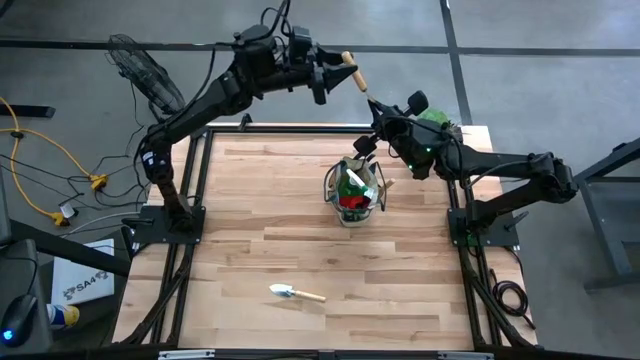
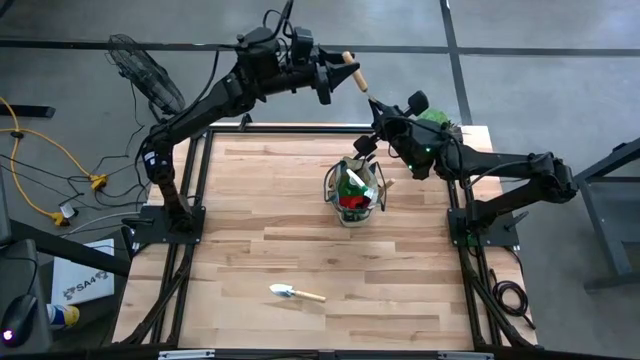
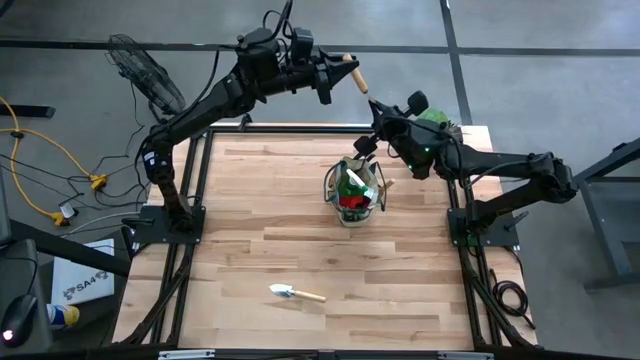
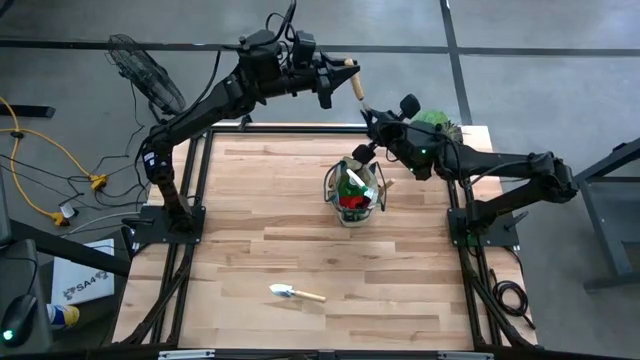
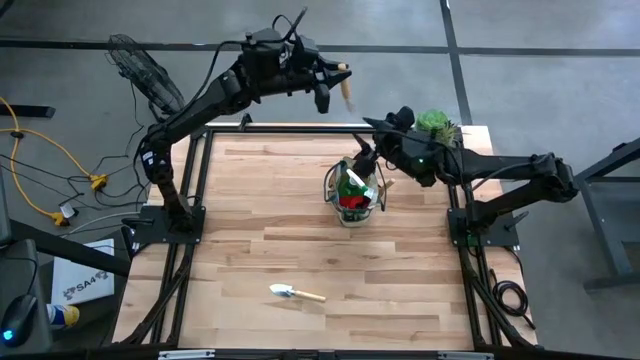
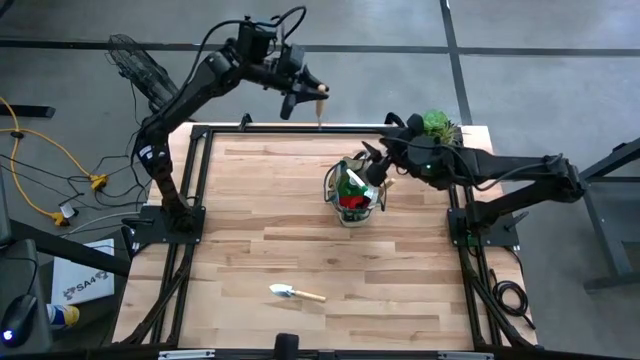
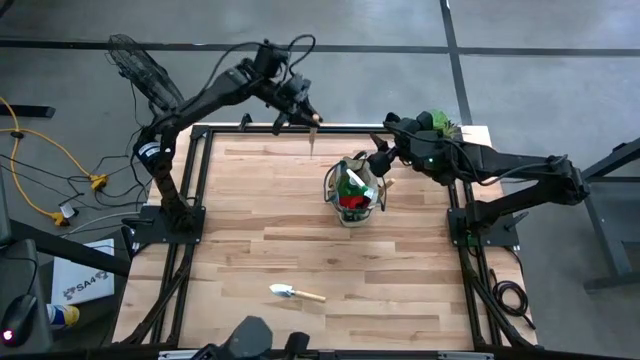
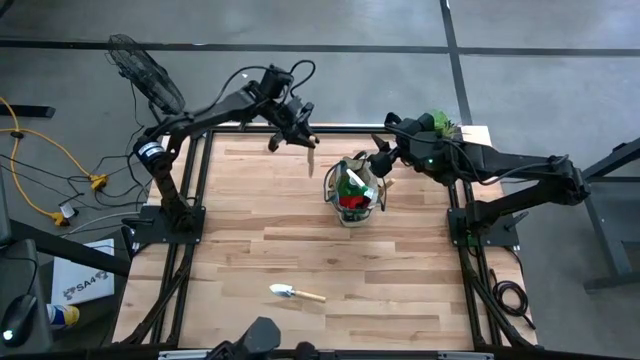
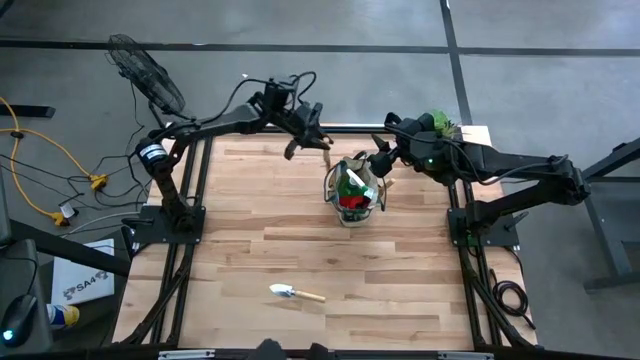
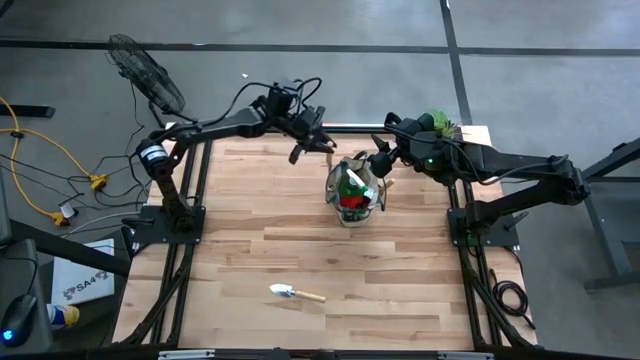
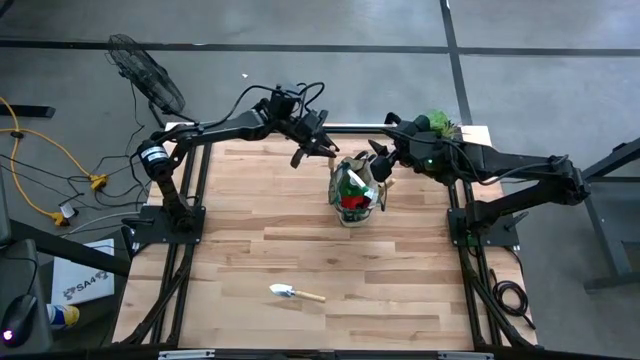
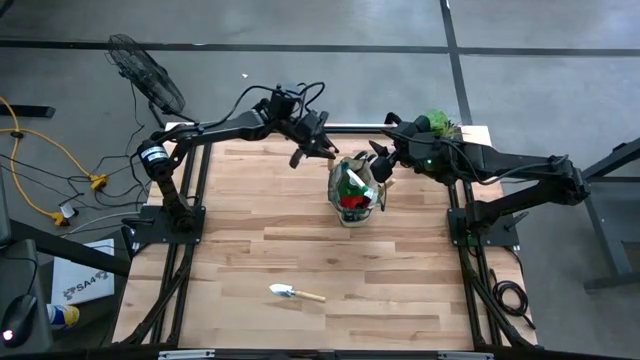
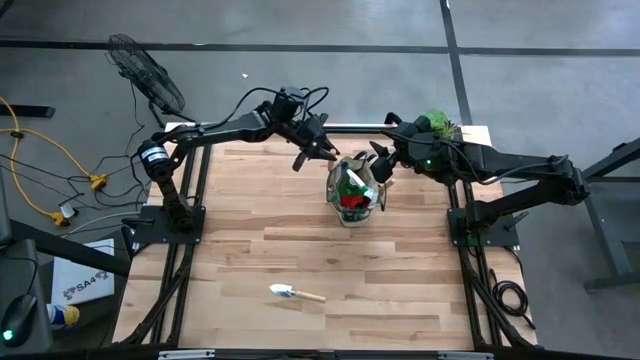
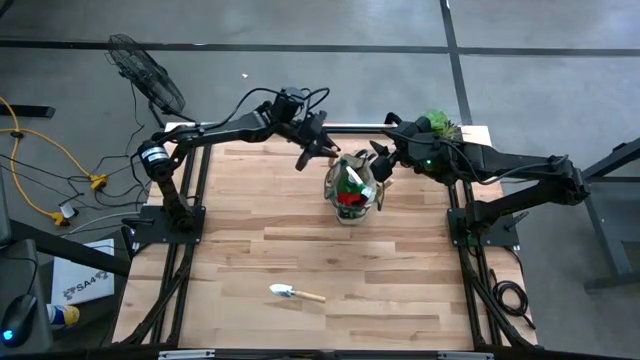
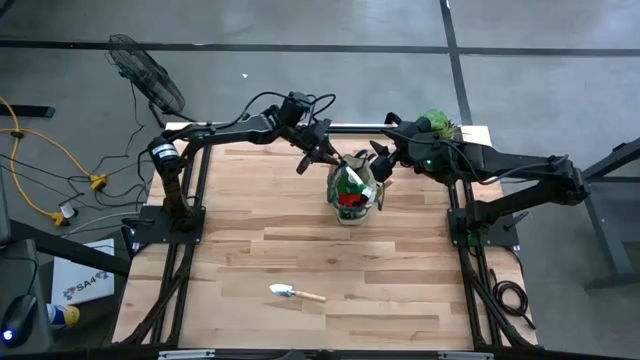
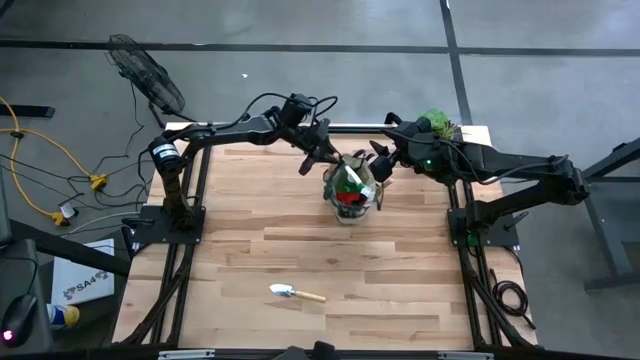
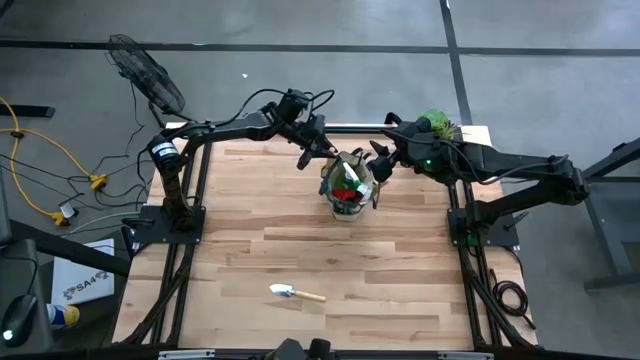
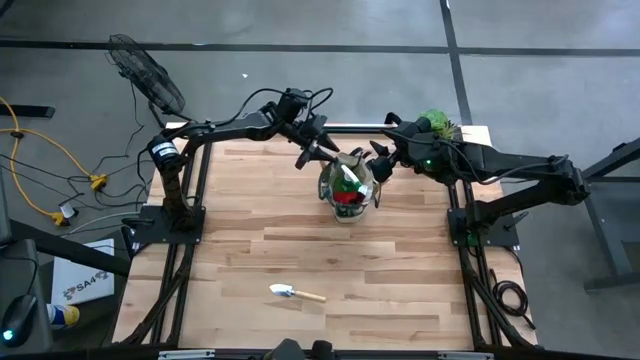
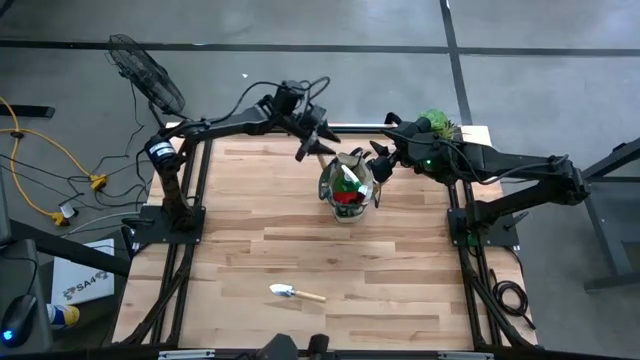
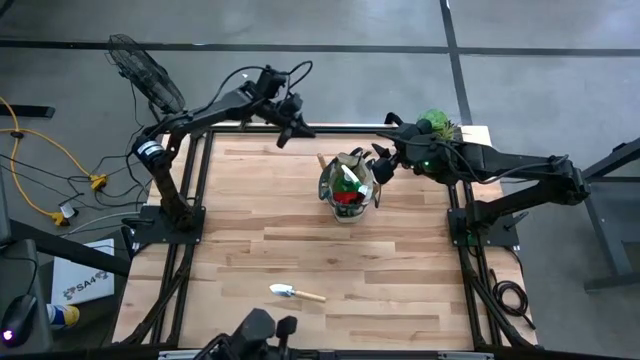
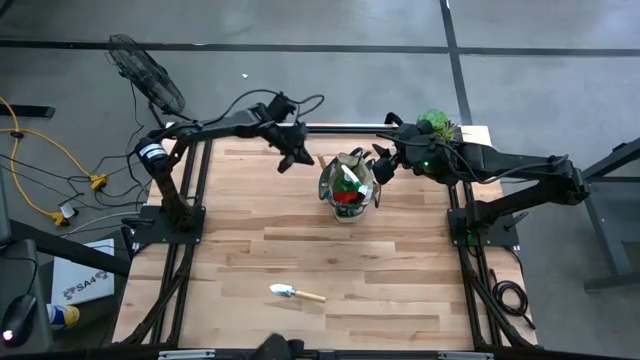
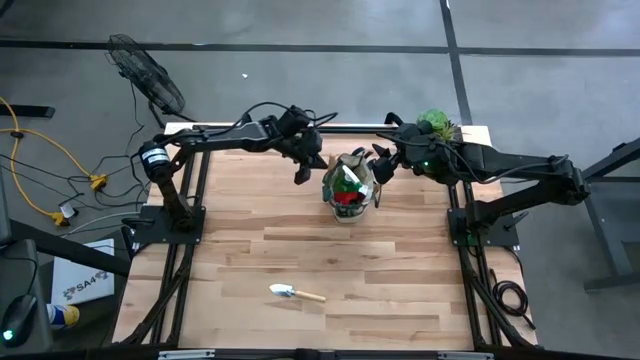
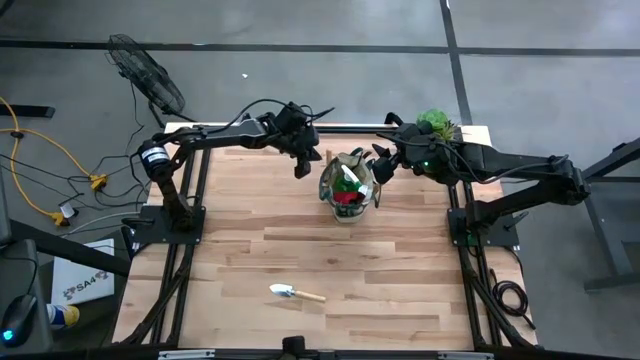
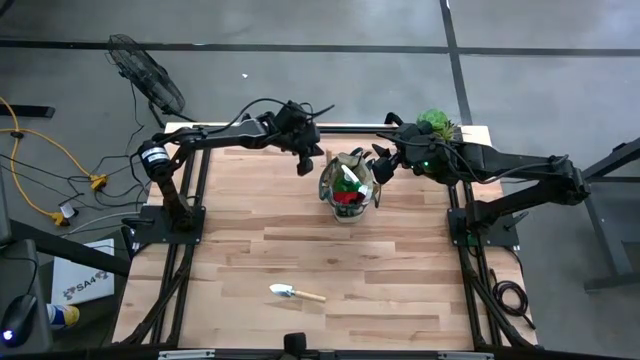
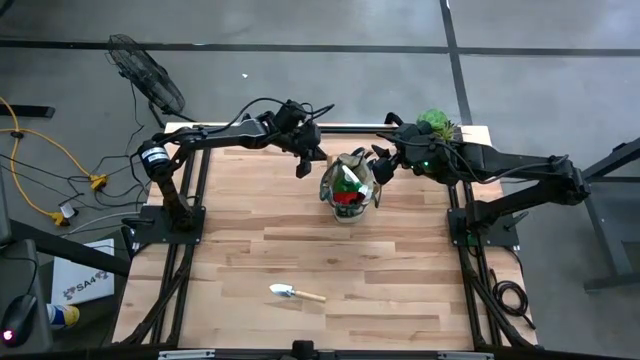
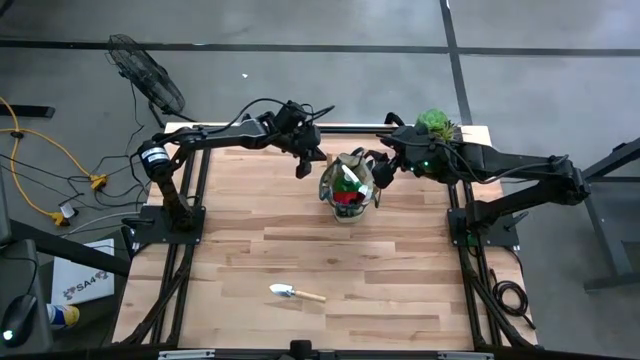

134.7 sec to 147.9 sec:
Task: Pick & Place Garden tools in Gardening bag
Put the left brown trowel into the gardening bag

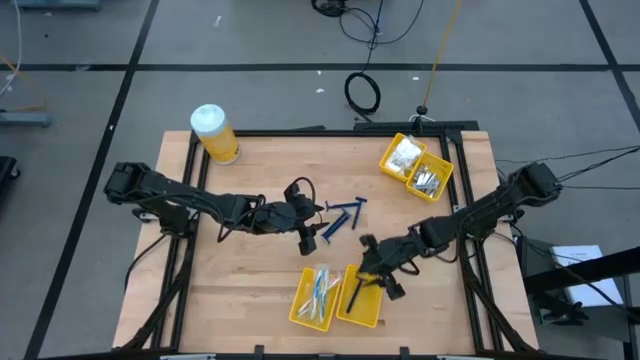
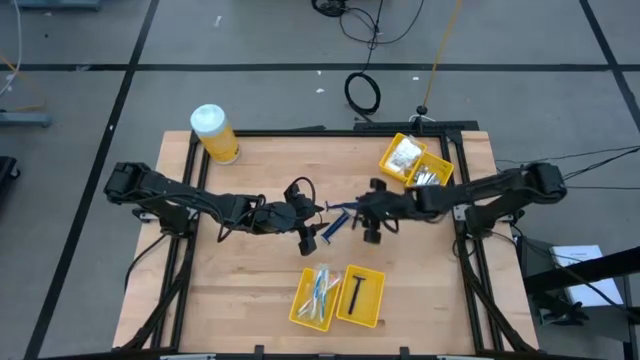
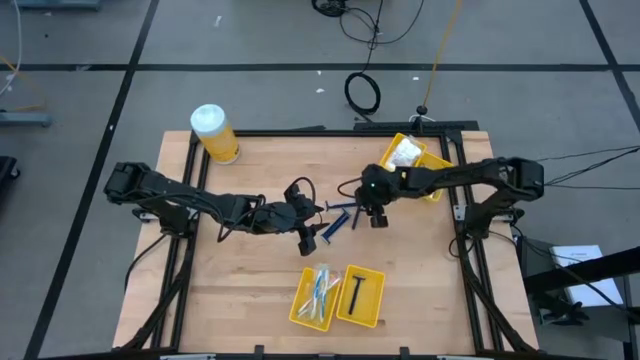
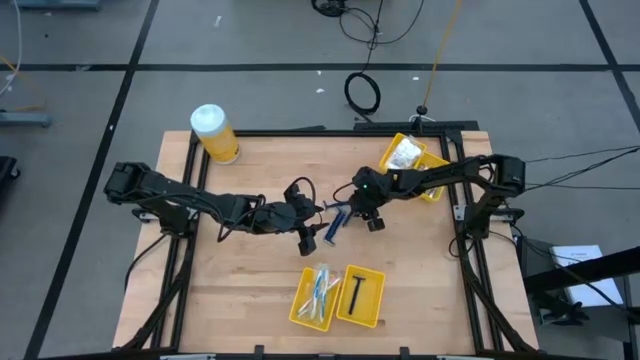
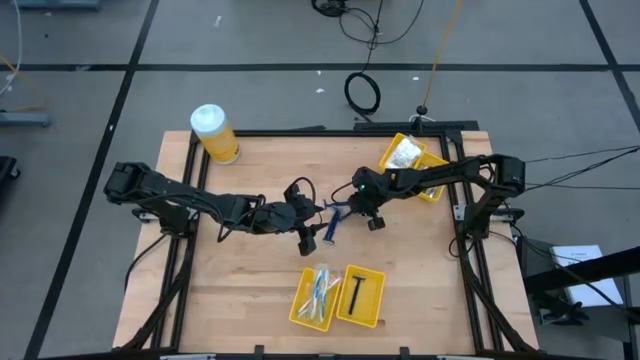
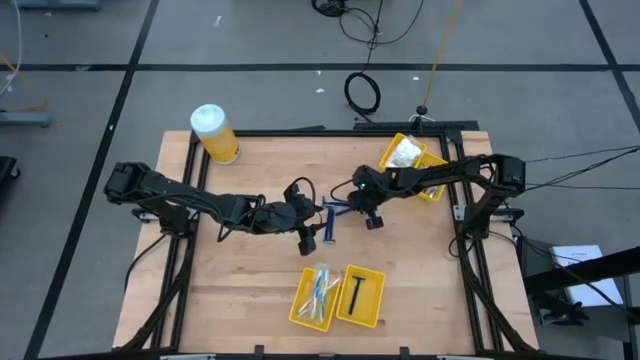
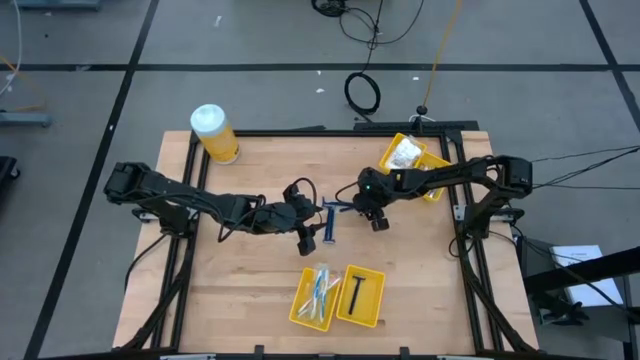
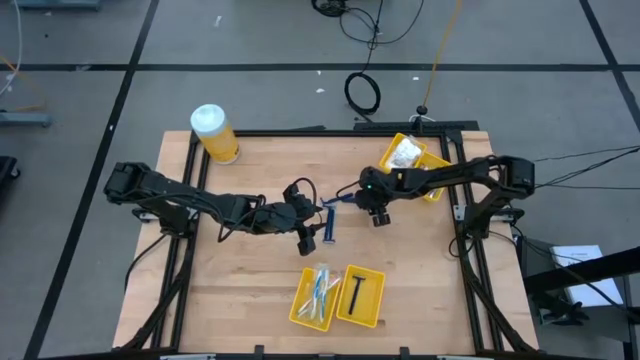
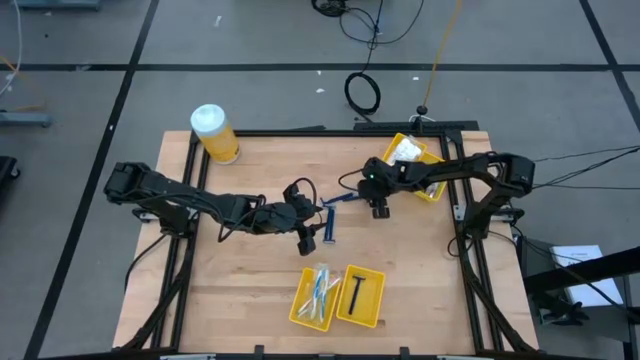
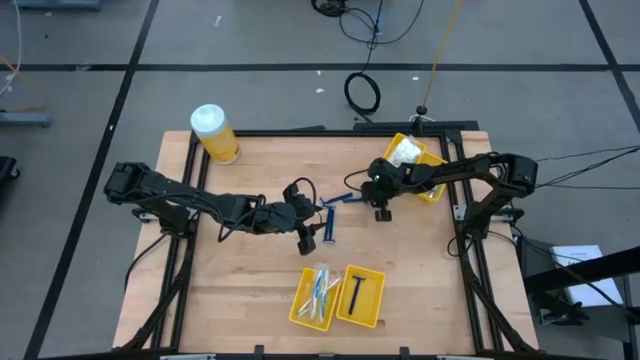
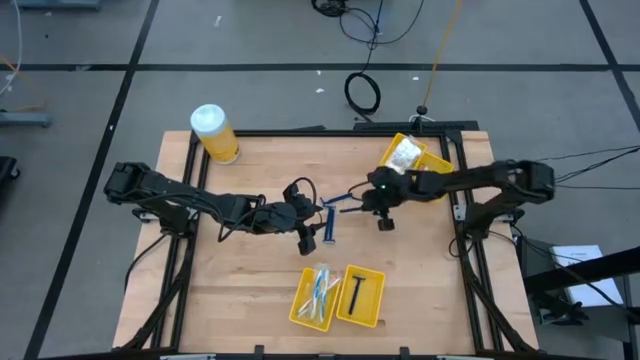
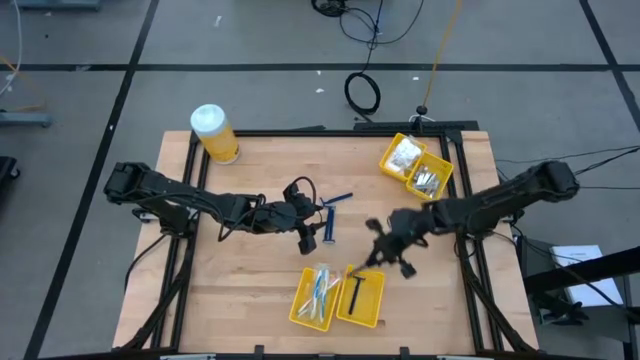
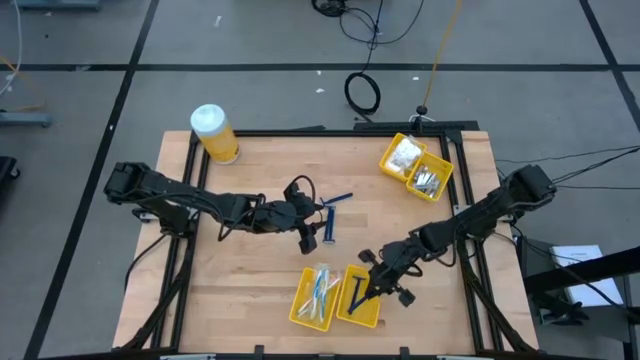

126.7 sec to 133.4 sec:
Task: Pick & Place Travel size toiletries
Put the blue rolled gauze into the bottom right yellow bin

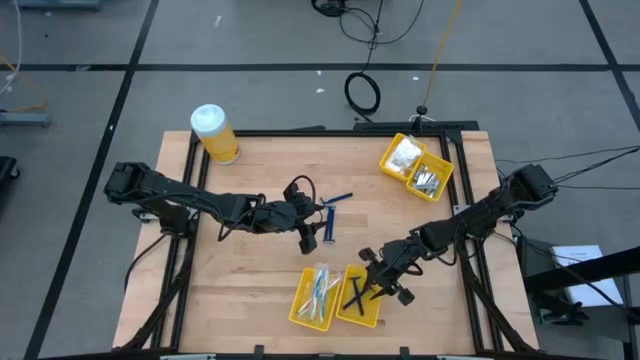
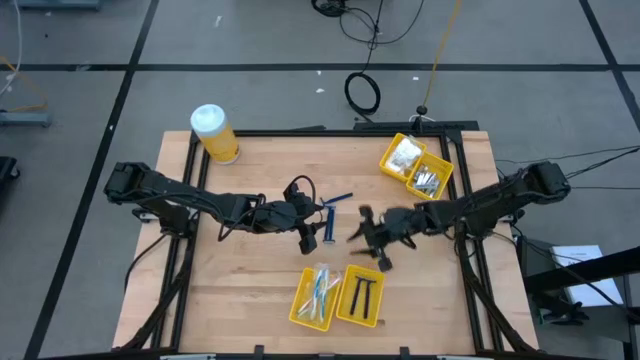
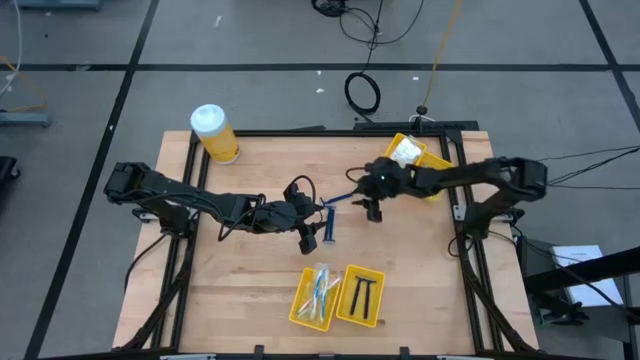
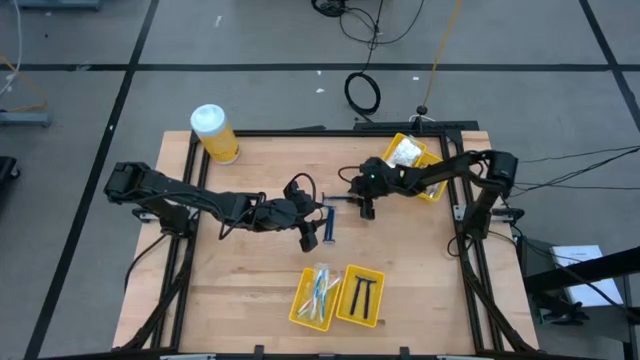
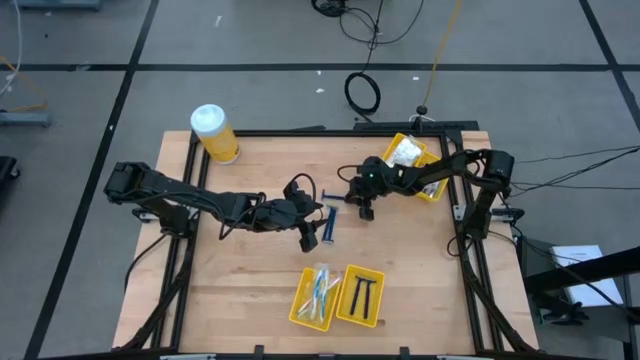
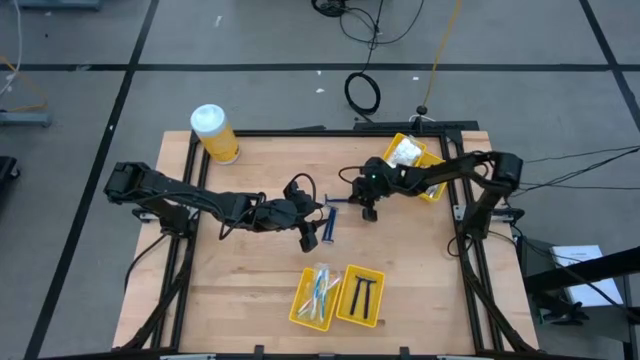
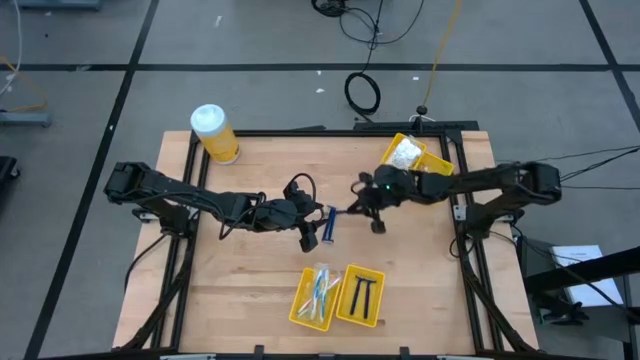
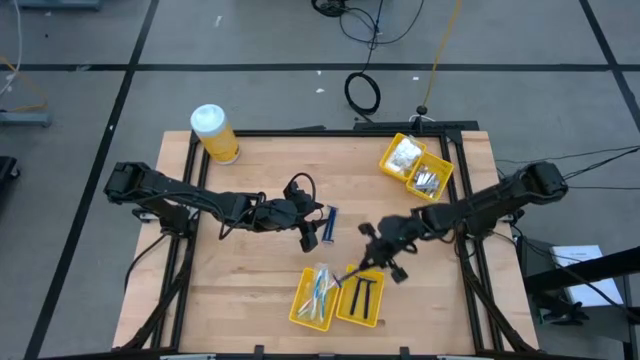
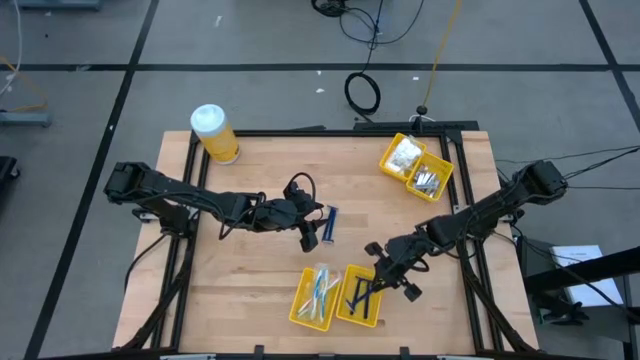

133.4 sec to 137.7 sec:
Put the blue rolled gauze into the bottom right yellow bin
